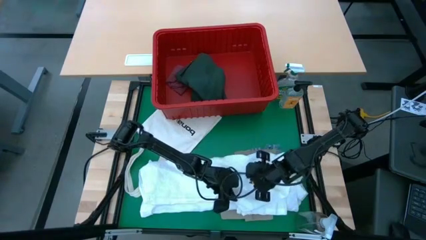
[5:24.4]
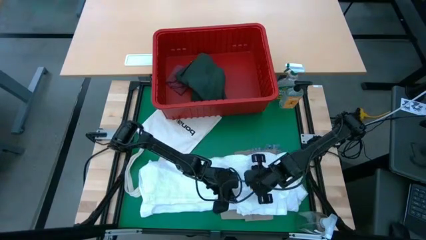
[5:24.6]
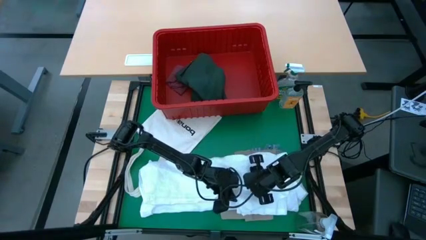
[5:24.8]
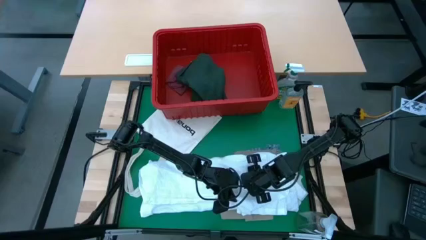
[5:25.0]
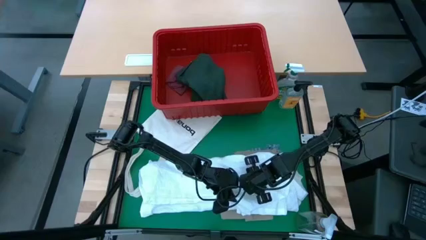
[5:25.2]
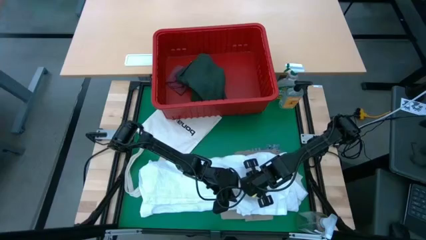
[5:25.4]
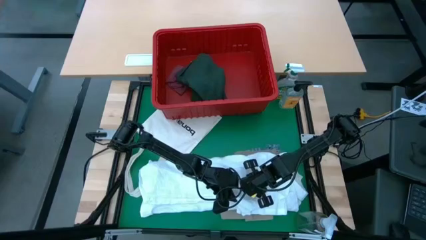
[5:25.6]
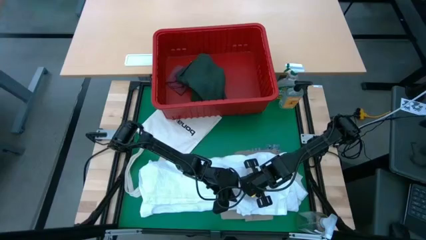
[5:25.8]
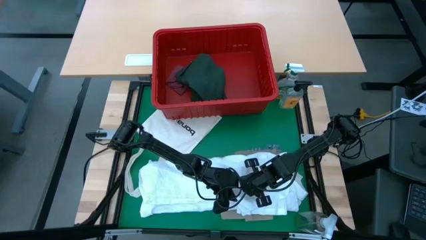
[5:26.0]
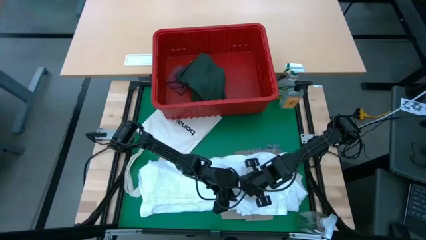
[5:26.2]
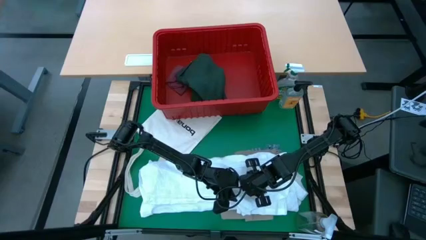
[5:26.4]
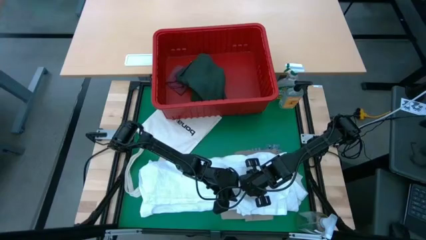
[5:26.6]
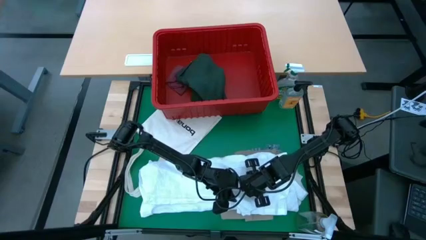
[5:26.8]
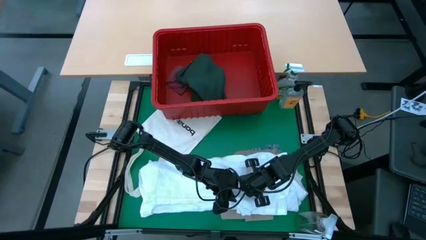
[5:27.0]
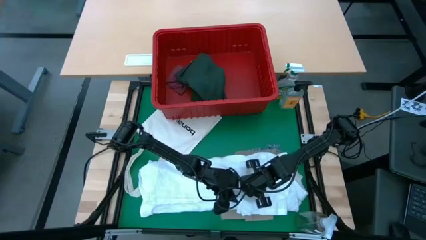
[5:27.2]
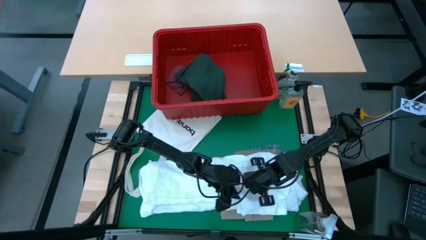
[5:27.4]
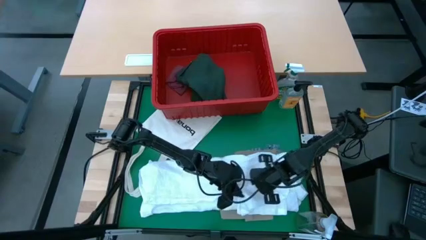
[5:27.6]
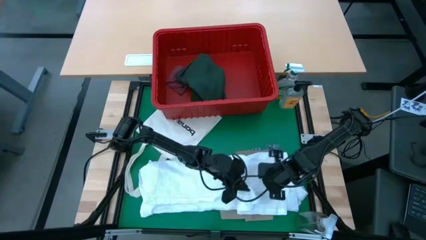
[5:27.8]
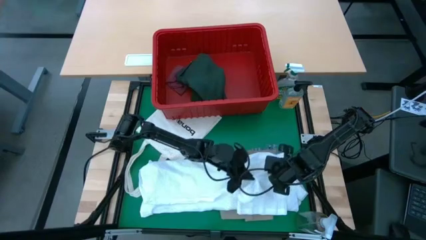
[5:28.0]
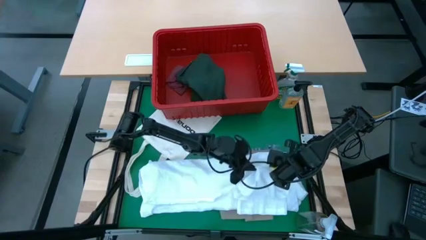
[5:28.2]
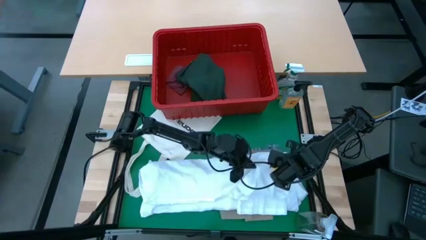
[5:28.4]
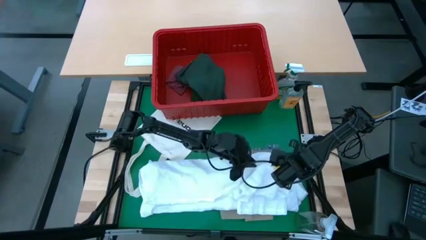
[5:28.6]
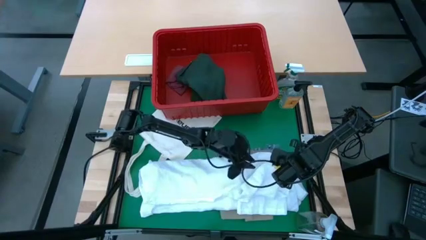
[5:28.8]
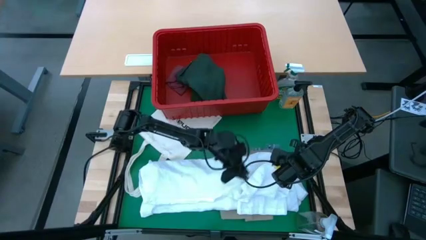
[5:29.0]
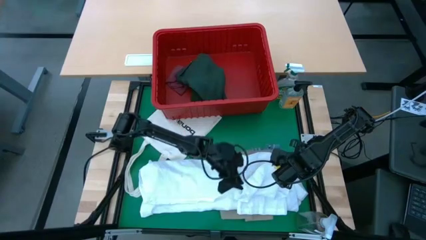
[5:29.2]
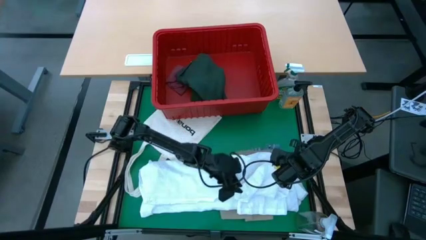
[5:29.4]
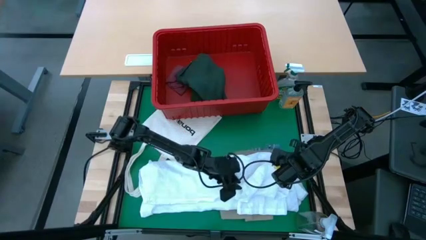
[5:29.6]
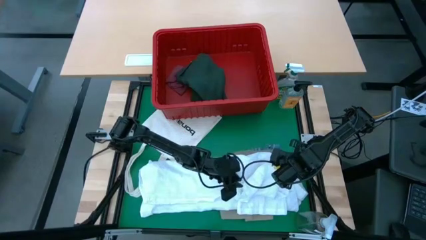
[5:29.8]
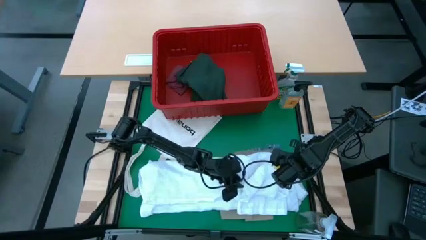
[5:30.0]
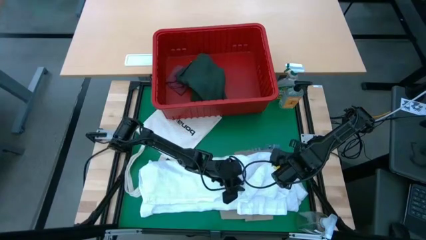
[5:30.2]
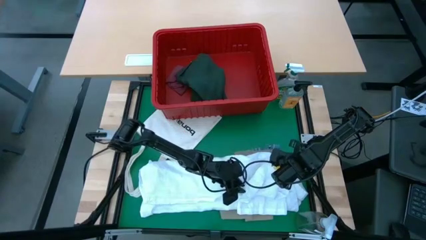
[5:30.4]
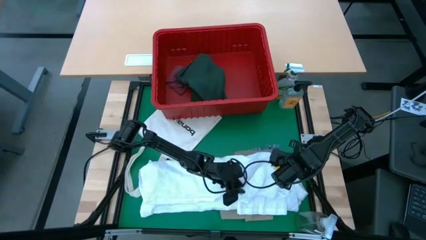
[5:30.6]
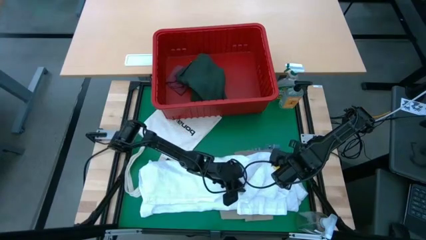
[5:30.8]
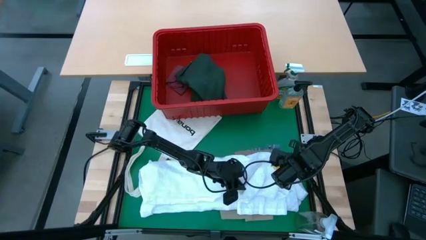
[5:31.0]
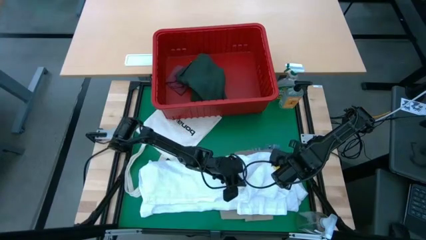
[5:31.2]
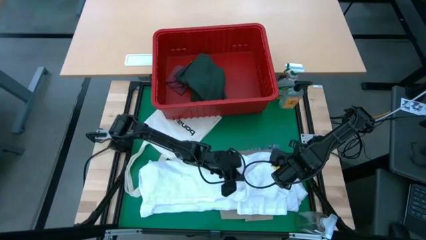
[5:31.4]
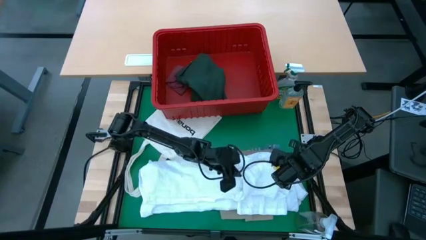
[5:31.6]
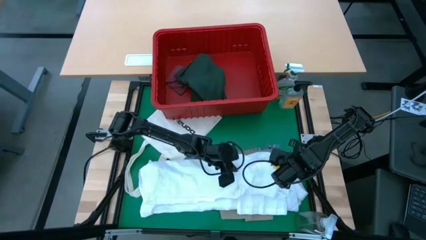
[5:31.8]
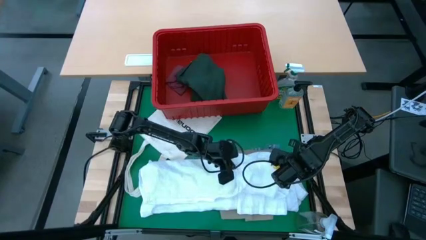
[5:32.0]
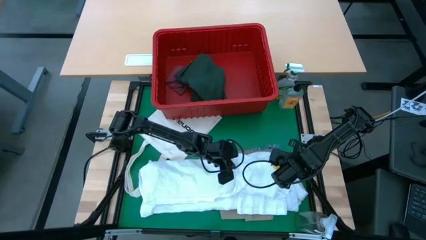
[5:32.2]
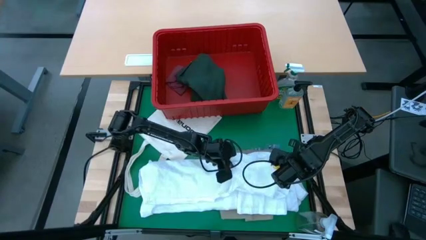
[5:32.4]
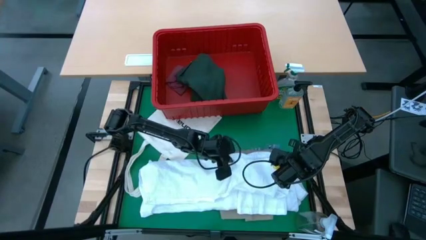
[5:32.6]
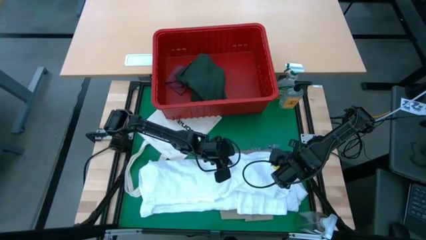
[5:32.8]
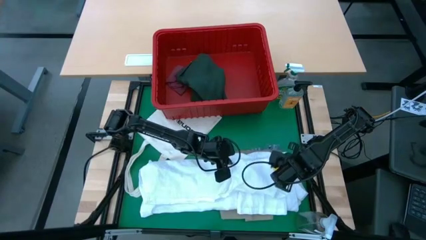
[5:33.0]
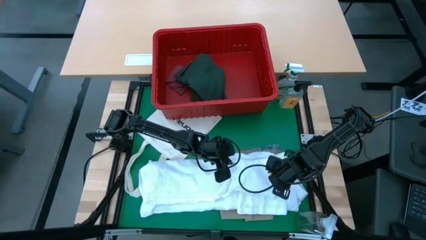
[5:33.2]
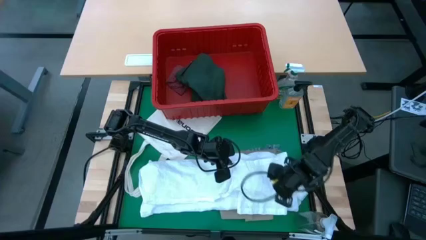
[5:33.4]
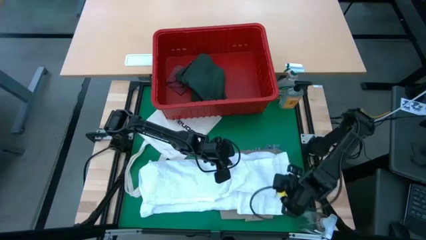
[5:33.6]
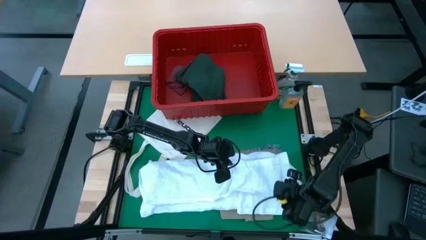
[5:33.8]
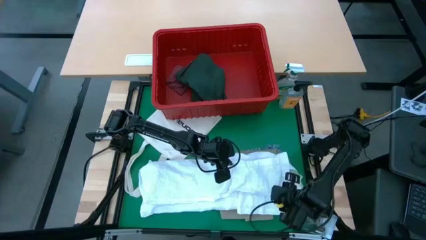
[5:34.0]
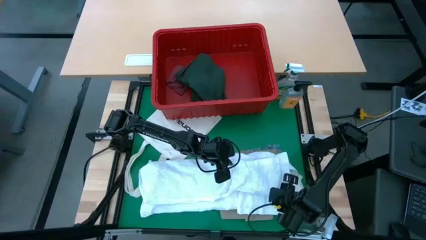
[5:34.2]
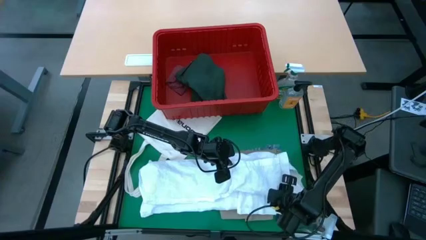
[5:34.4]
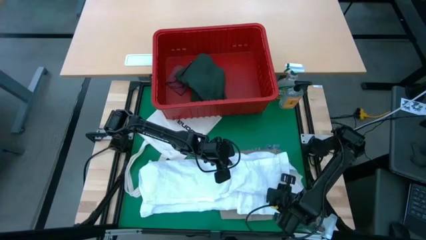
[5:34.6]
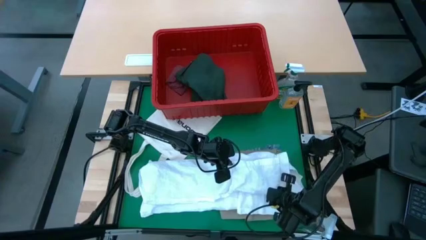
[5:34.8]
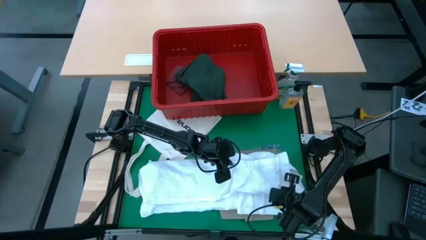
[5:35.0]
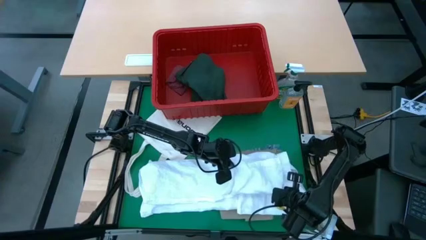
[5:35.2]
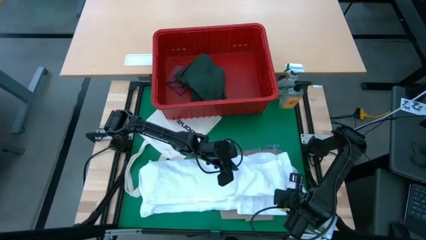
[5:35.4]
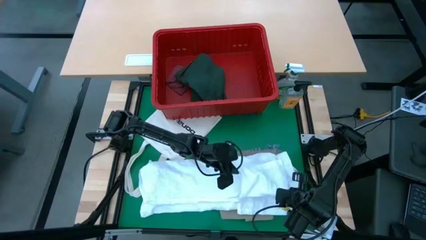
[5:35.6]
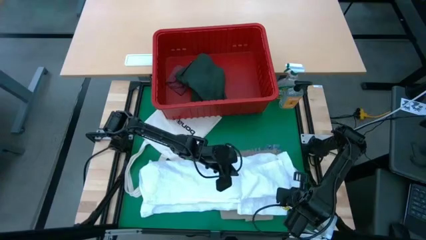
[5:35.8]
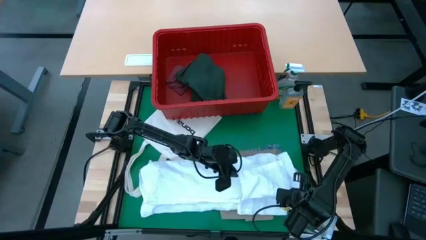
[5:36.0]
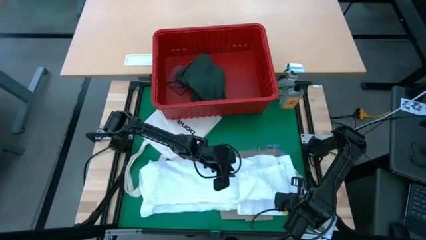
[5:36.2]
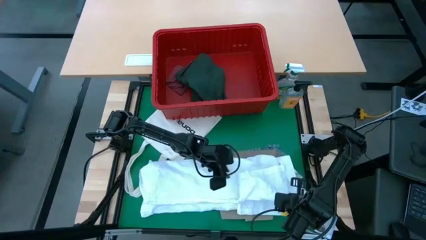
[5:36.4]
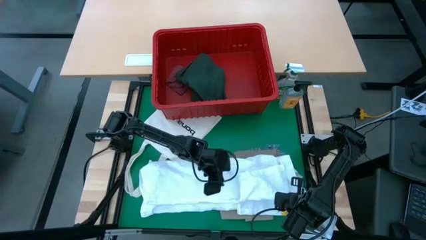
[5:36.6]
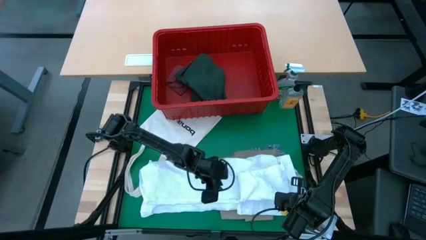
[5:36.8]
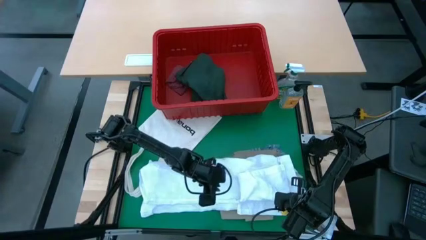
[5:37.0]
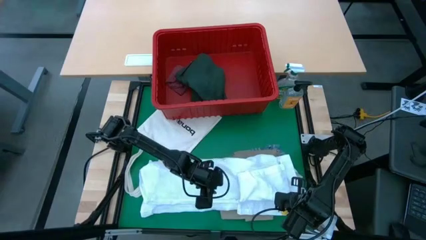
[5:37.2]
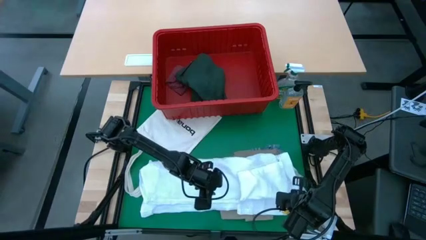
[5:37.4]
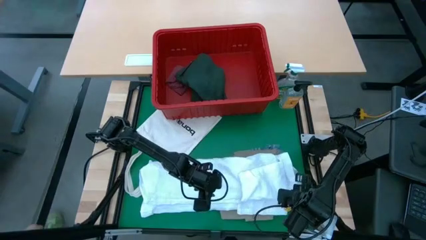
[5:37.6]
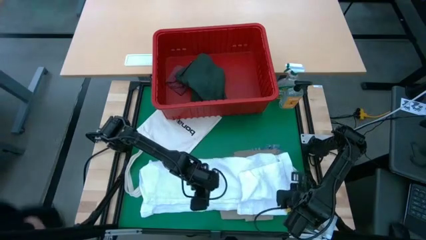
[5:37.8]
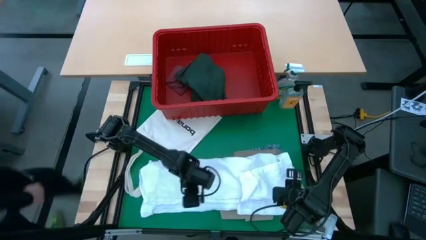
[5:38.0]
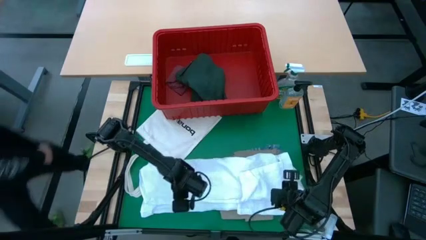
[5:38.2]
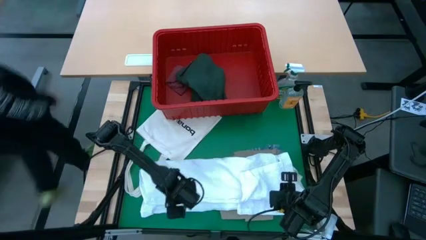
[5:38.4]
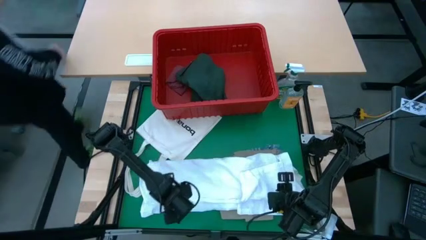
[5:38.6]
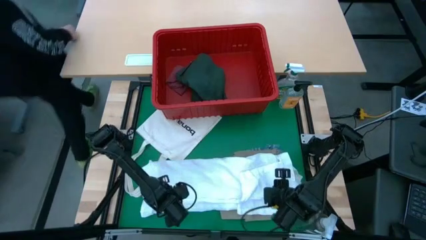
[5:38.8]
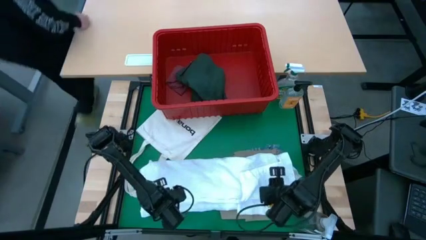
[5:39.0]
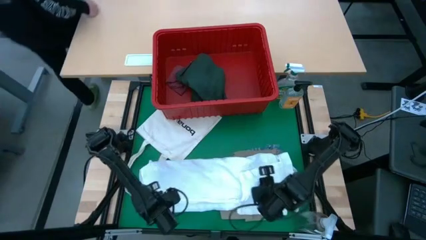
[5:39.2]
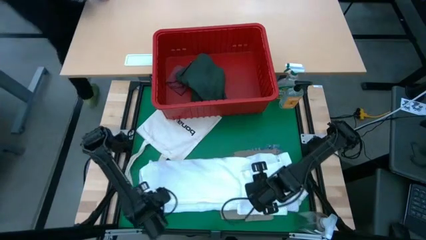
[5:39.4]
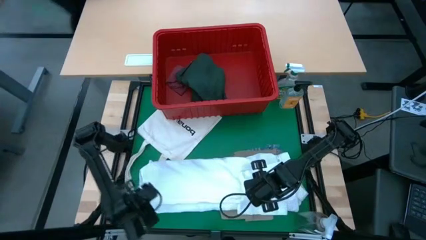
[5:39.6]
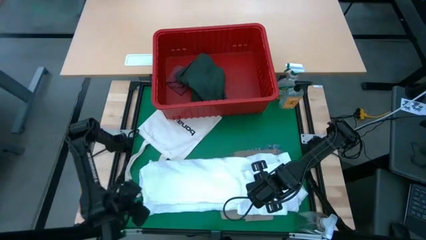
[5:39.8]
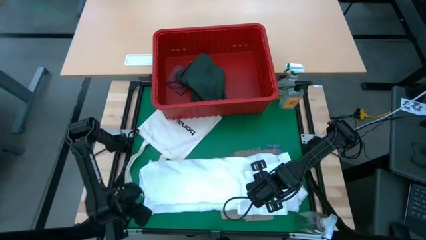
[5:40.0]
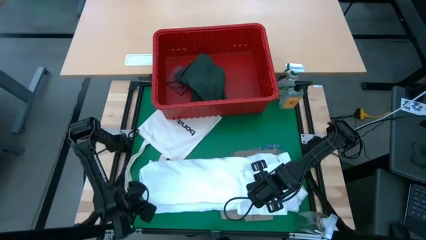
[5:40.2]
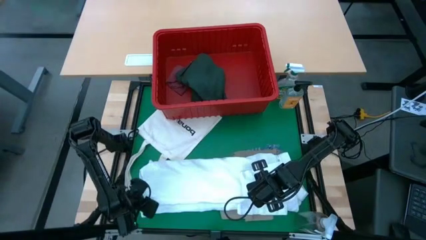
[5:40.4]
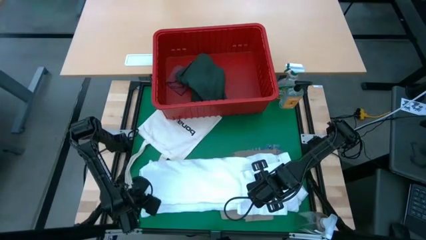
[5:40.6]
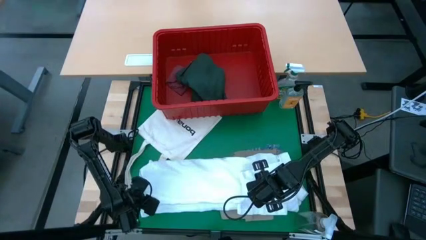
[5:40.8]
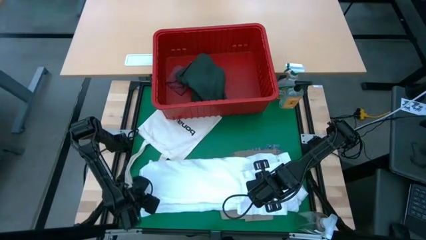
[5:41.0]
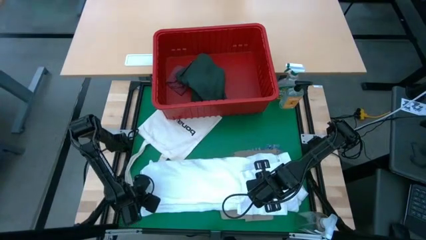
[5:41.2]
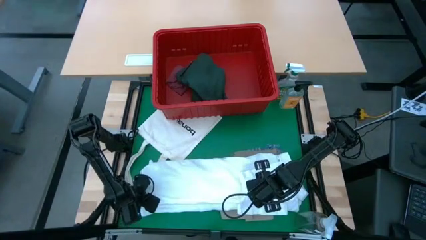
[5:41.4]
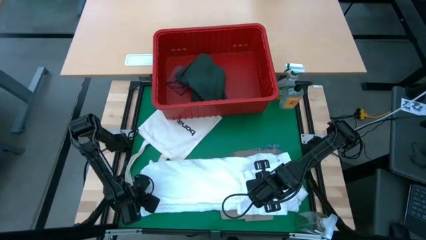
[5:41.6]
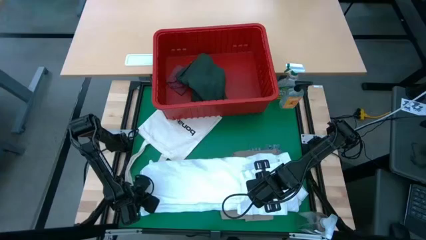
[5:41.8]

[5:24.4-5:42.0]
Task: Fold Laundry from Bin
Fold the white polo shirt
